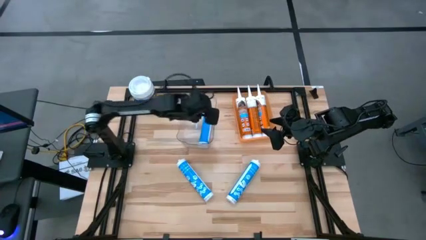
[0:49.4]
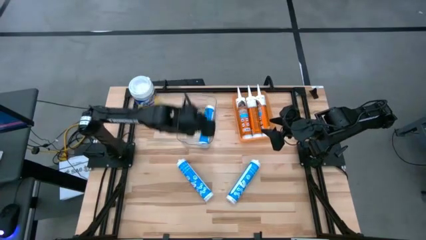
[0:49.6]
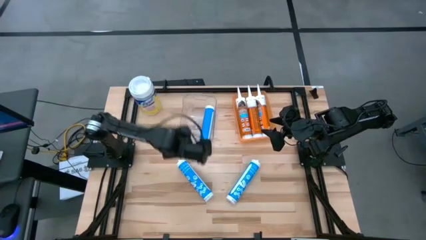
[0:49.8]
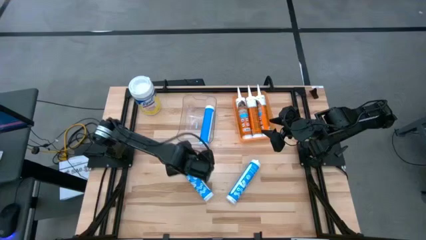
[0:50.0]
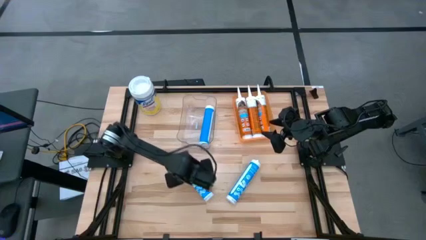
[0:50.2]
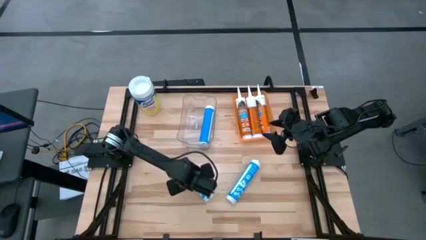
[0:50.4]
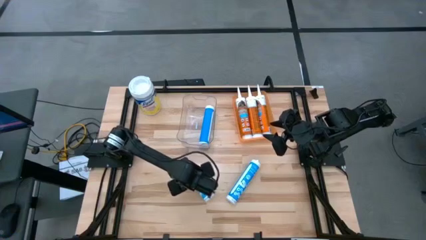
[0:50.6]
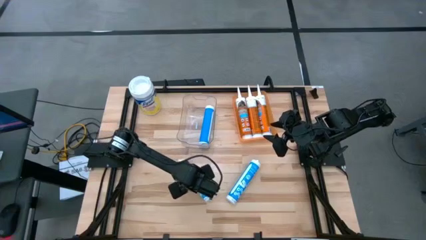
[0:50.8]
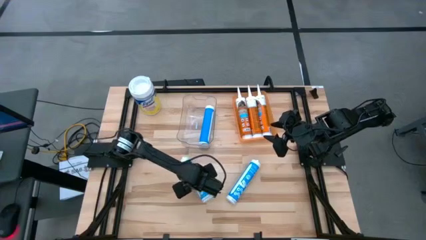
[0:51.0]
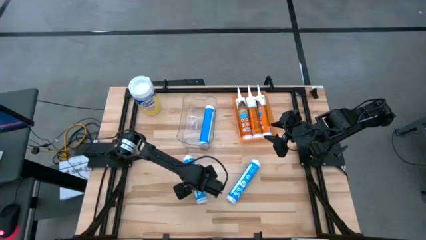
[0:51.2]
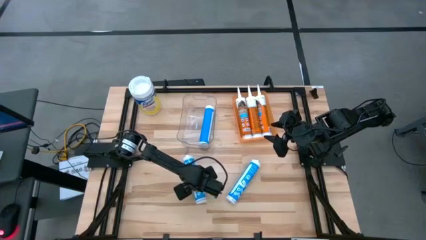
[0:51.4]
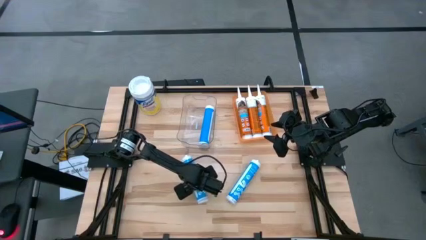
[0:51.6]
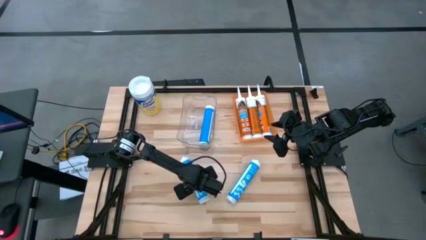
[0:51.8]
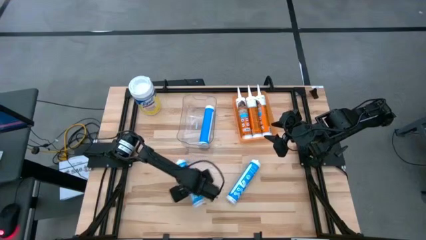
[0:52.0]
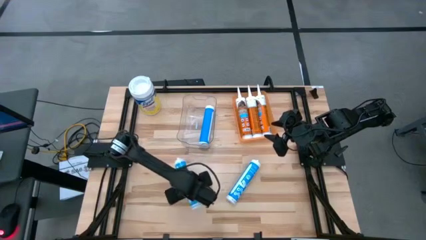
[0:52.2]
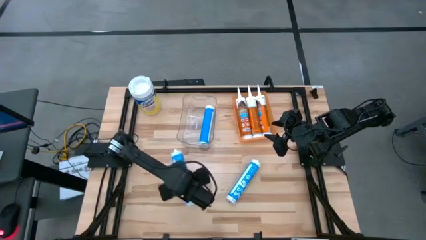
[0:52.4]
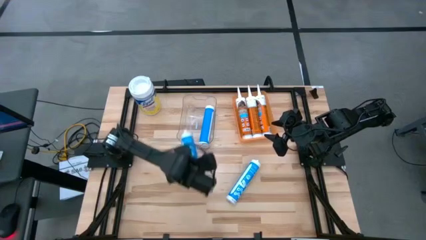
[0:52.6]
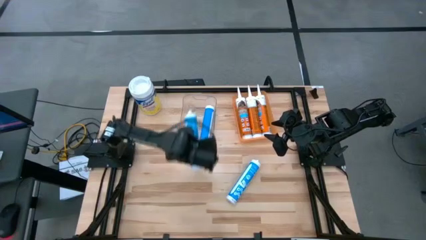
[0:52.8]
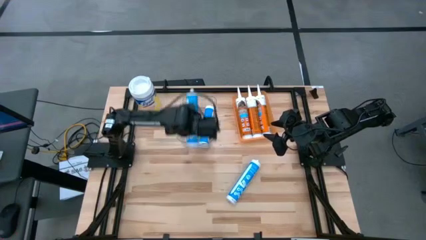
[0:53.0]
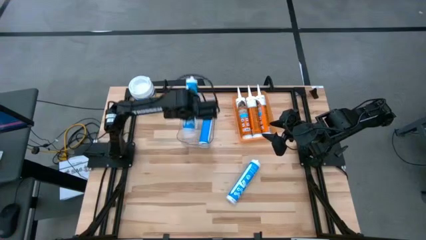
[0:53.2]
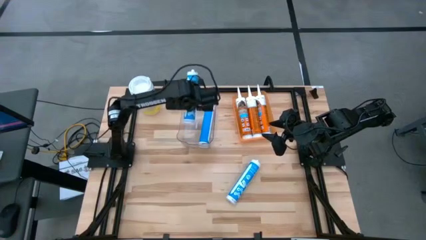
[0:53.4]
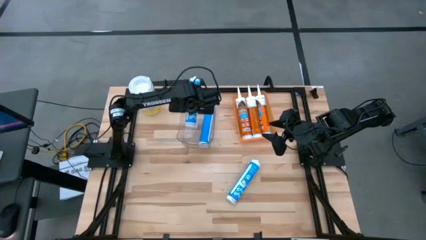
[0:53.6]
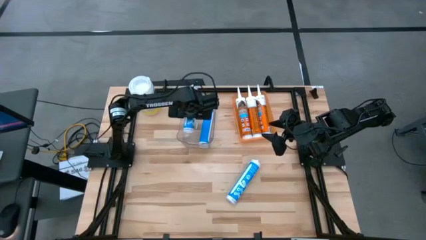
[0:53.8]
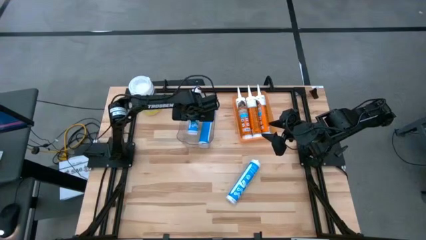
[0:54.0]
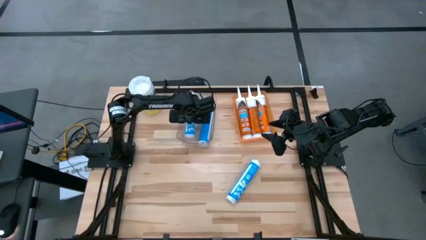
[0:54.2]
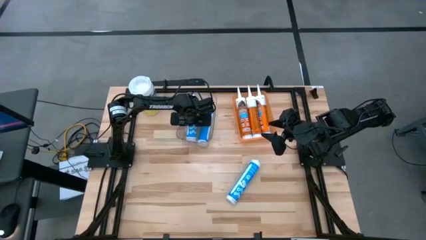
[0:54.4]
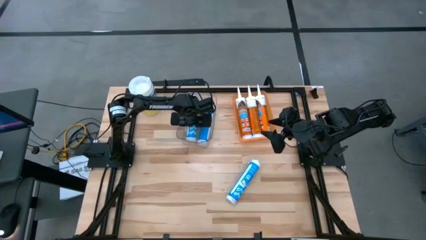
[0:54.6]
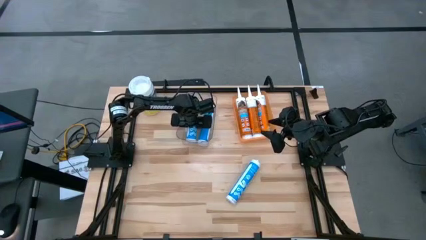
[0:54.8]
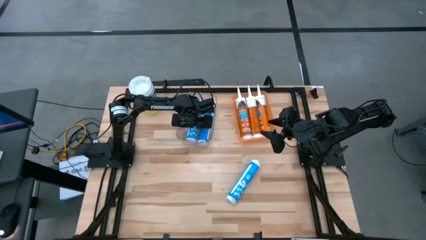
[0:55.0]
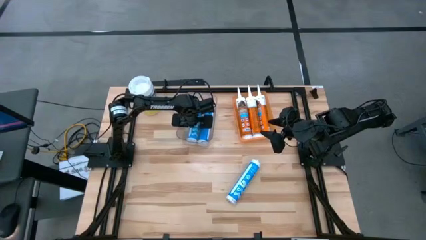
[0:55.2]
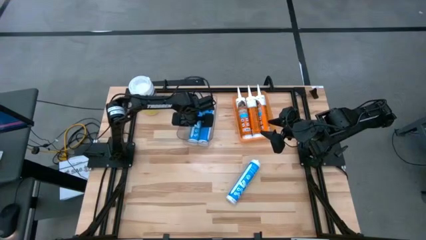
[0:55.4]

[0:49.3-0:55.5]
Task: Pick & place silicon tubes, Sealant and Lysol wipes
Put the blue sealant into the transparent bin

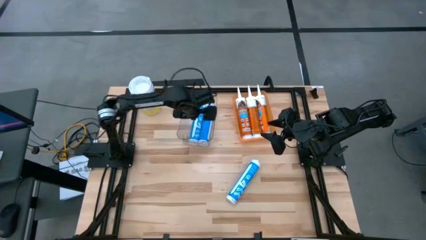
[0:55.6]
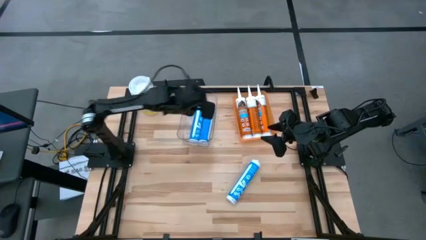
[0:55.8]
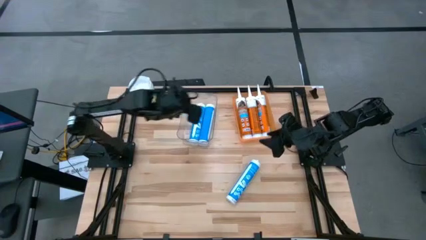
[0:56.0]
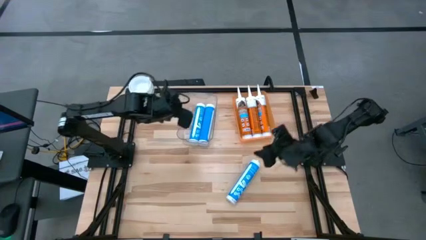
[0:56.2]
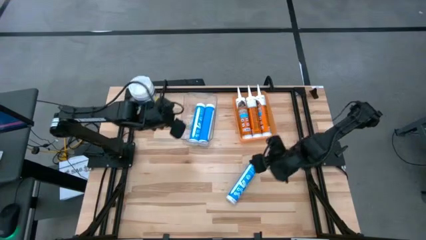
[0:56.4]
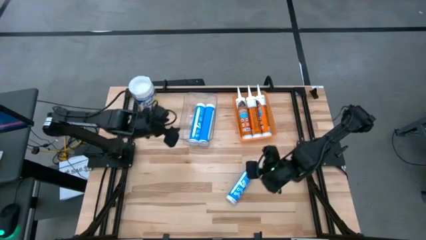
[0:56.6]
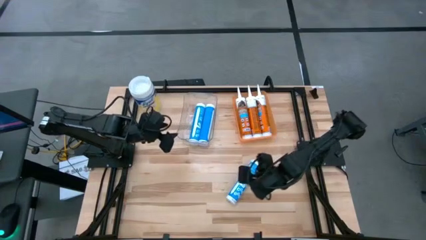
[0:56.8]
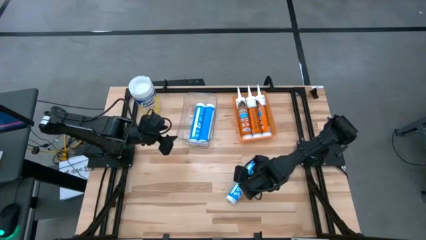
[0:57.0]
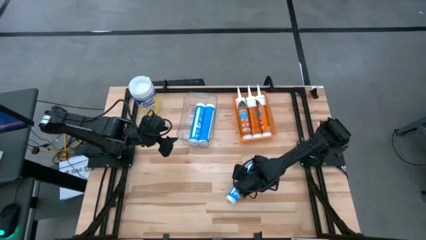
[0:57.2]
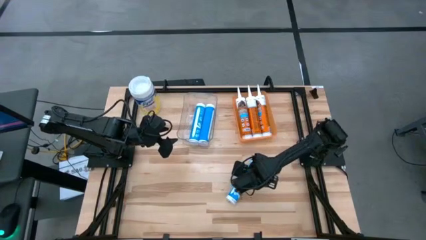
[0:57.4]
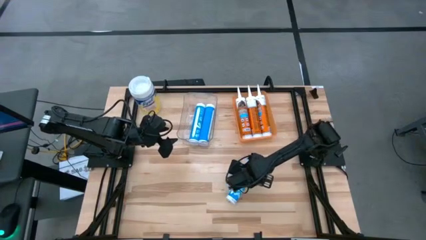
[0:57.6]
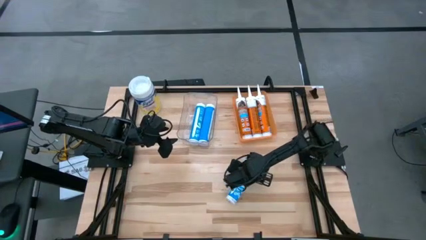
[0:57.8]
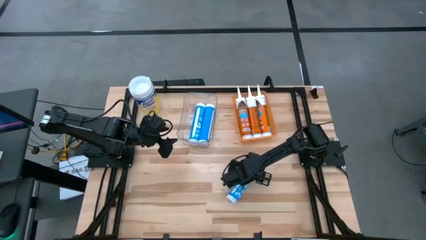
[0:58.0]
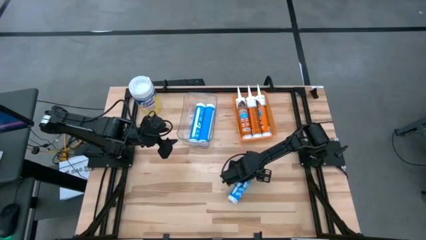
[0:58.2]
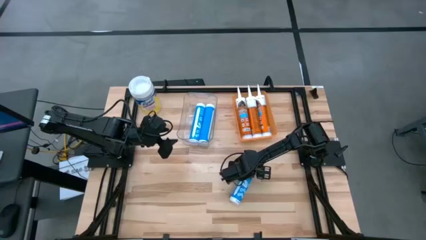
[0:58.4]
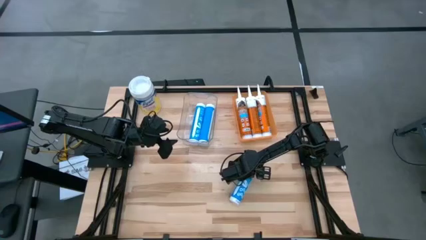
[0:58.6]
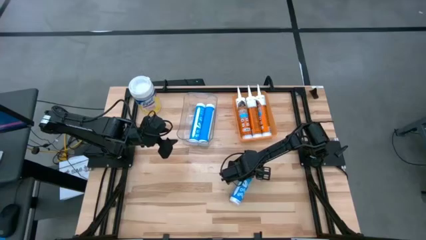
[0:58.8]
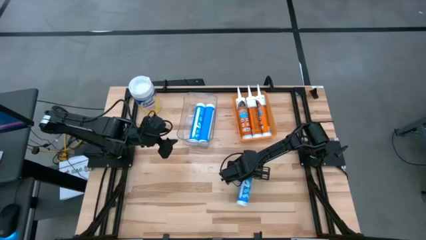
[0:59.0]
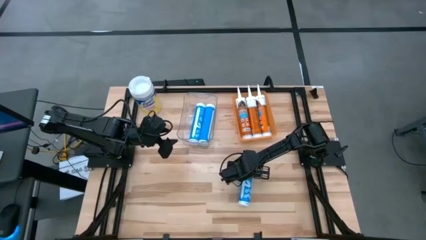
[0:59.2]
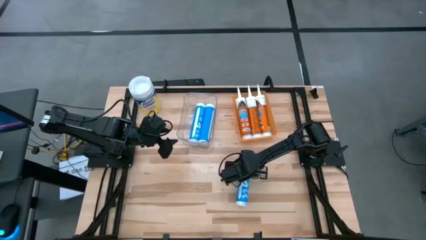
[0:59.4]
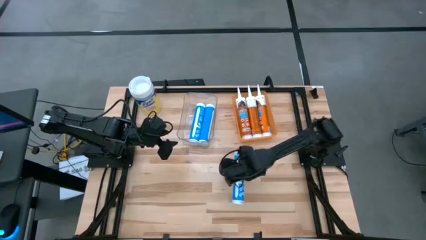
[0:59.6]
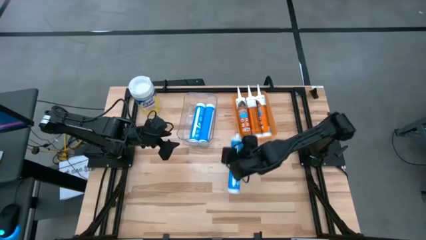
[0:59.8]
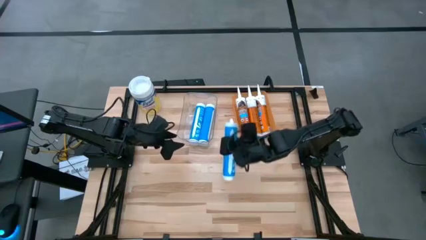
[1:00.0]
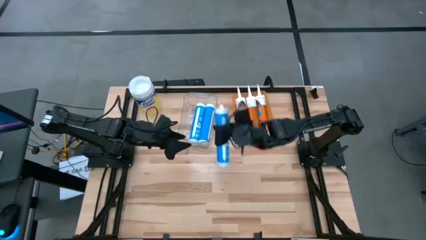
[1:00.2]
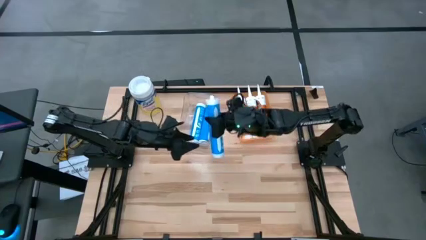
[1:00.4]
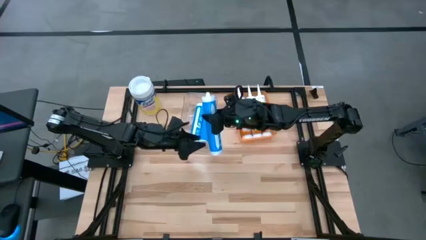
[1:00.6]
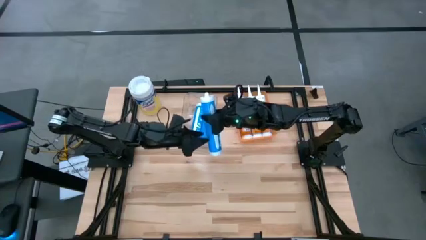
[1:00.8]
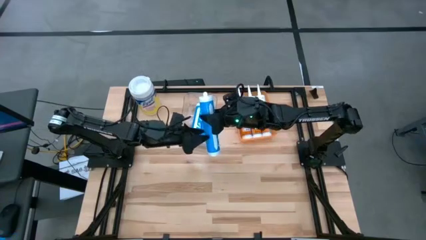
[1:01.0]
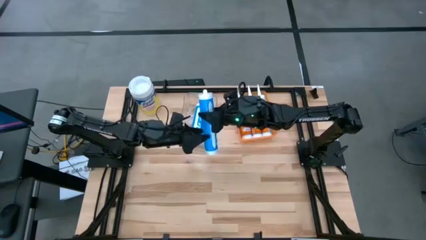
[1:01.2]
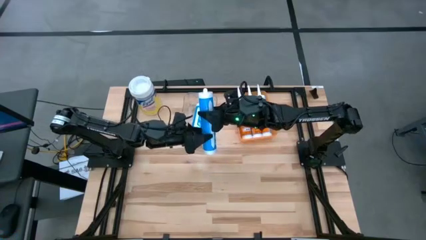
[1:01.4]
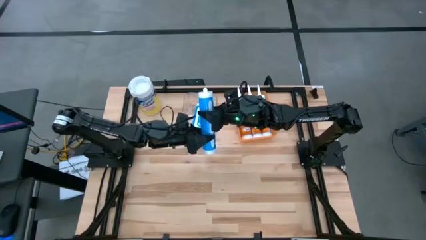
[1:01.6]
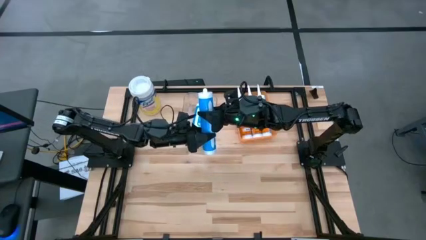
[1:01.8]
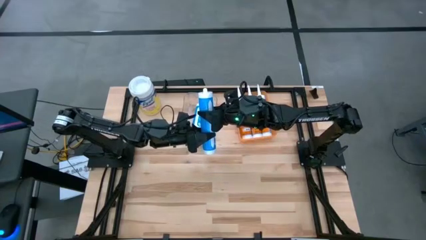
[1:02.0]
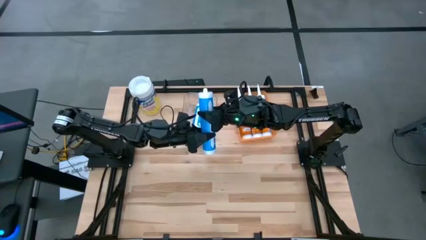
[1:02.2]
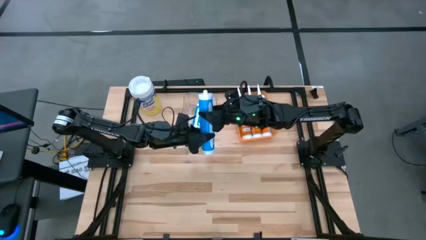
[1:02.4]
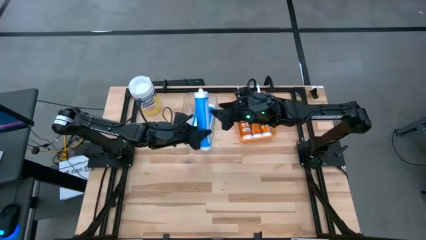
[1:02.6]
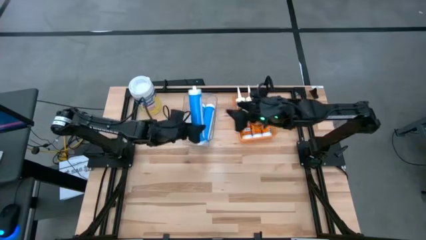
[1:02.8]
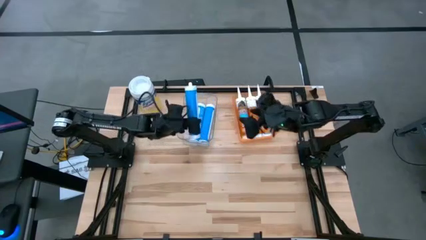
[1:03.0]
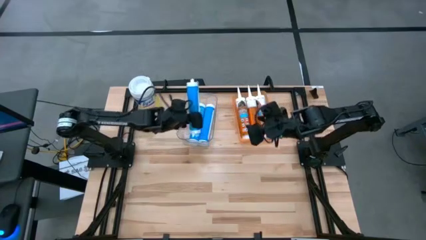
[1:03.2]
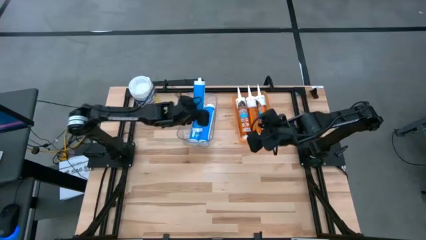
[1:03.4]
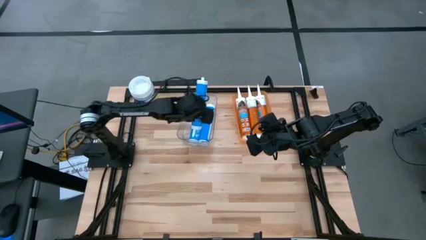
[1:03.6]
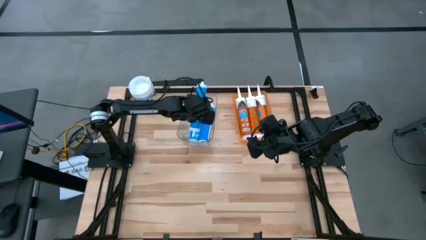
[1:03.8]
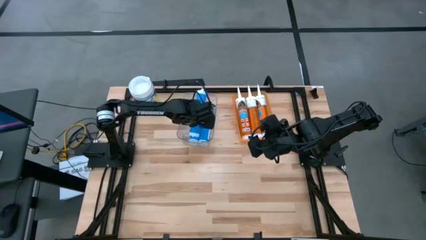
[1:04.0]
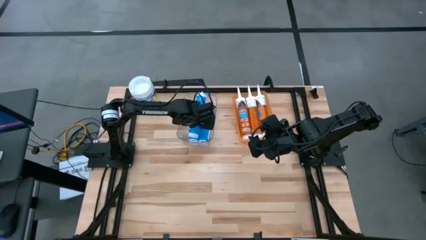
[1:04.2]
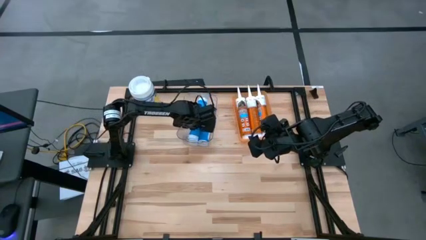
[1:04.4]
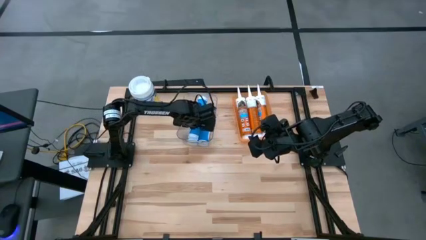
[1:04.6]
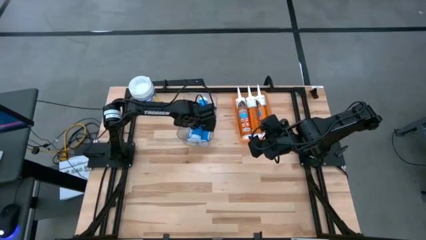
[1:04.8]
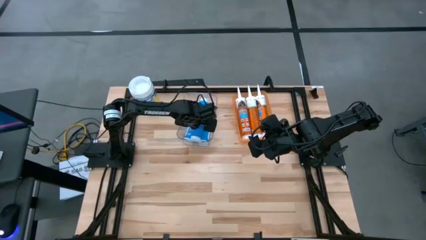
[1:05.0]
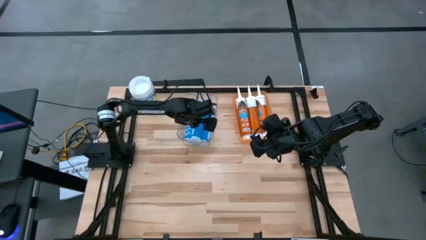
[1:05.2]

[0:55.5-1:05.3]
Put the blue sealant into the transparent bin

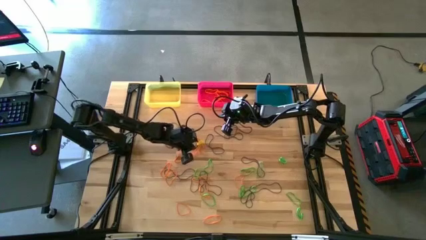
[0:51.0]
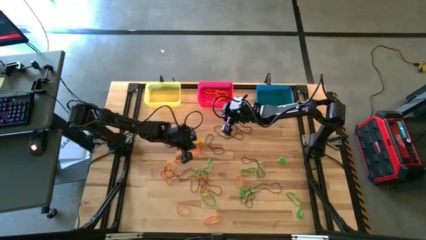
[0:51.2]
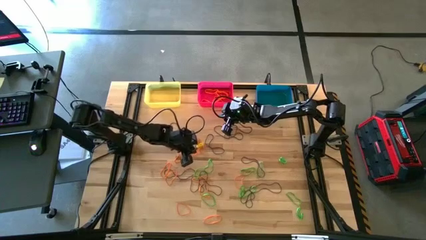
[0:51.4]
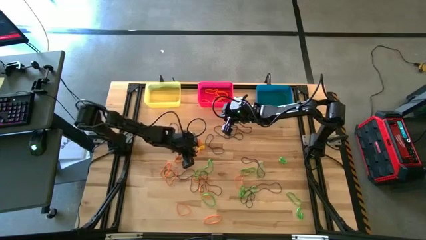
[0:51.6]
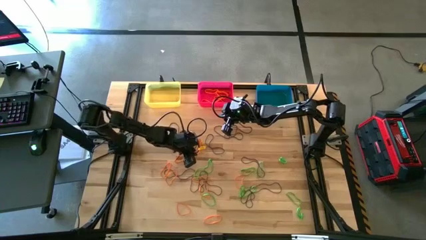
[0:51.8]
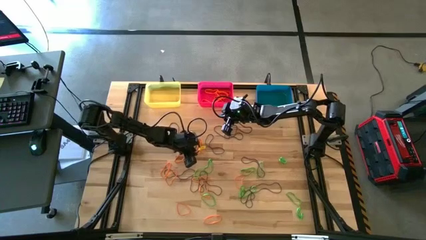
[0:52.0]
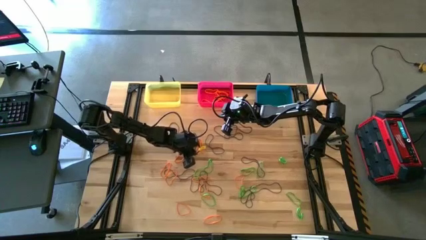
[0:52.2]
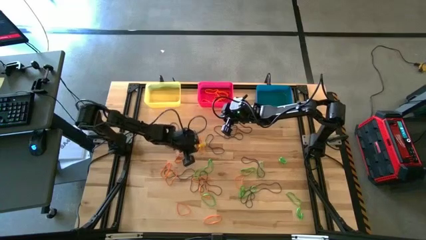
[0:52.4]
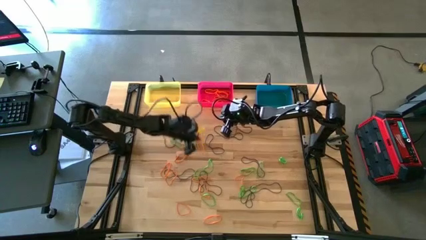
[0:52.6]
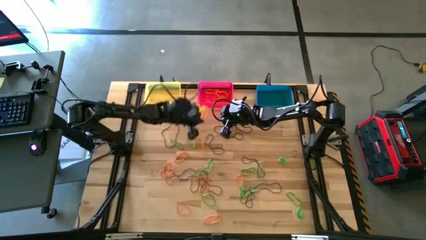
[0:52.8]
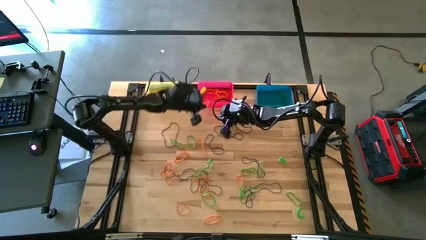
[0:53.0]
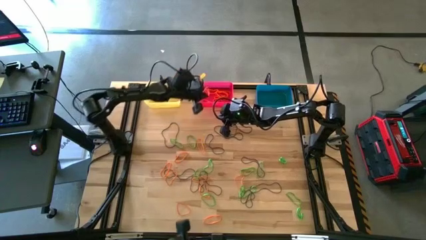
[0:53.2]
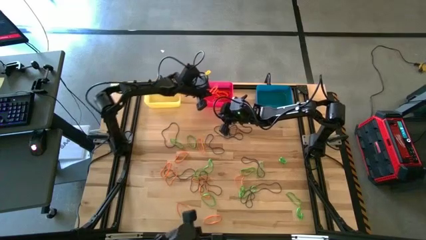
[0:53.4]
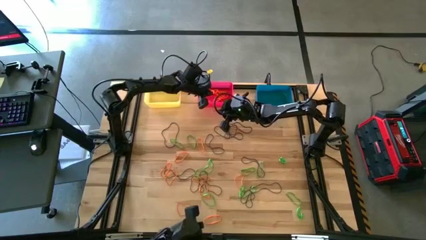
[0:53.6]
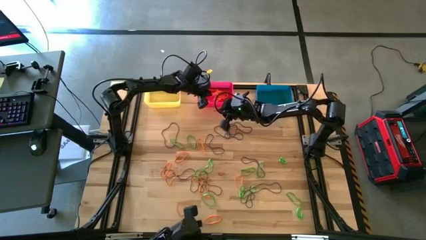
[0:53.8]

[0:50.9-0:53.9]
Task: Sort rubber bands into baskets
Put the orange rubber band into the pink bin
